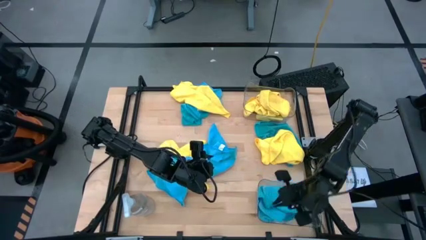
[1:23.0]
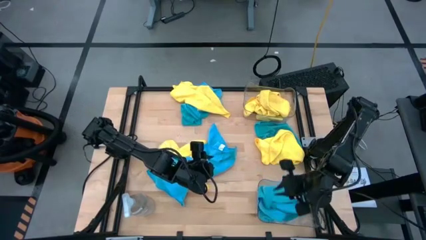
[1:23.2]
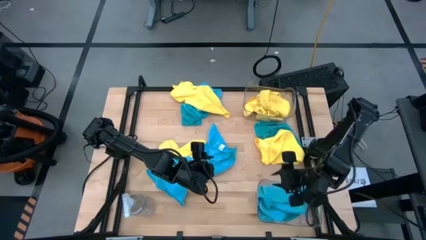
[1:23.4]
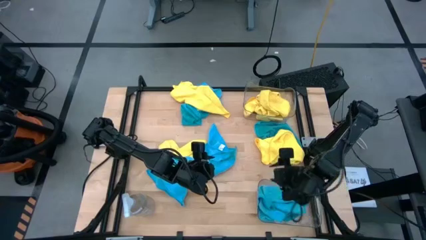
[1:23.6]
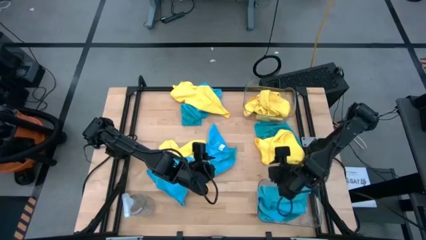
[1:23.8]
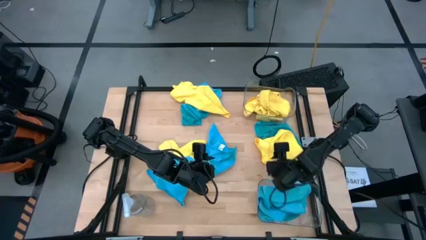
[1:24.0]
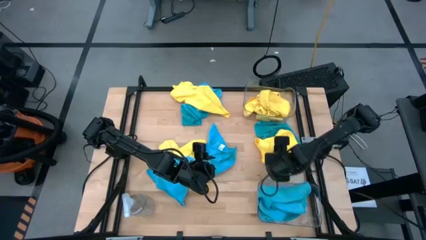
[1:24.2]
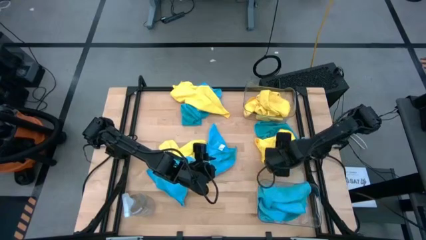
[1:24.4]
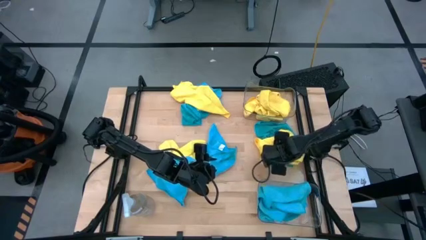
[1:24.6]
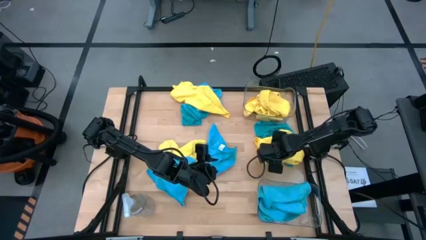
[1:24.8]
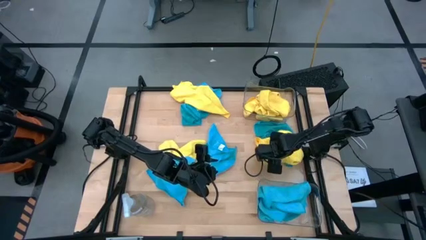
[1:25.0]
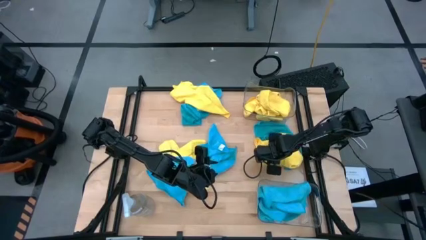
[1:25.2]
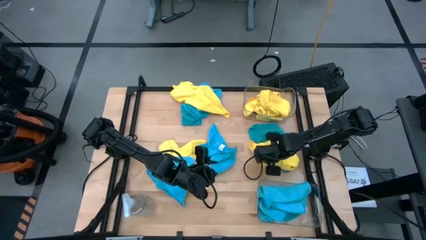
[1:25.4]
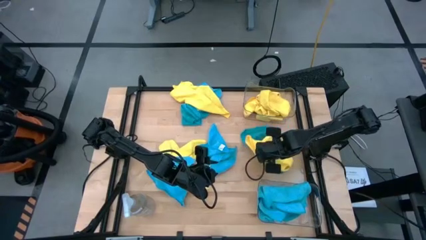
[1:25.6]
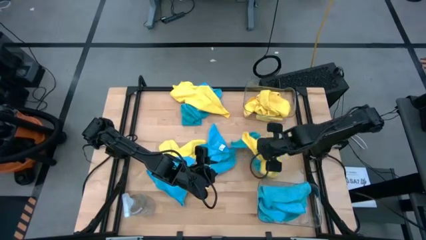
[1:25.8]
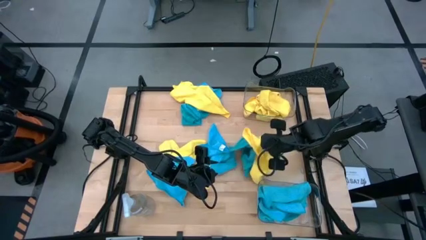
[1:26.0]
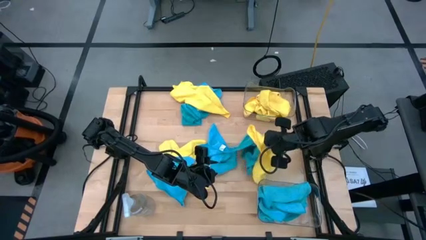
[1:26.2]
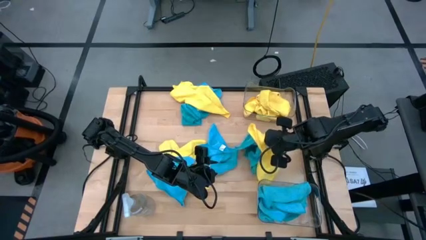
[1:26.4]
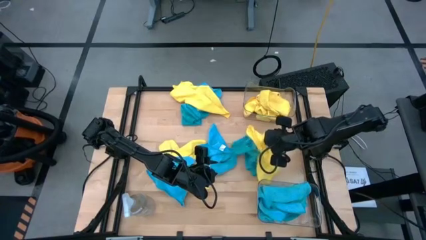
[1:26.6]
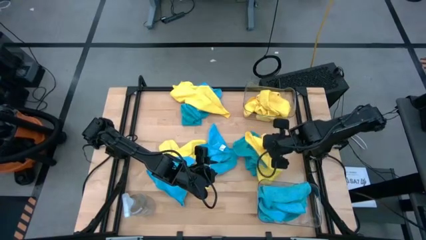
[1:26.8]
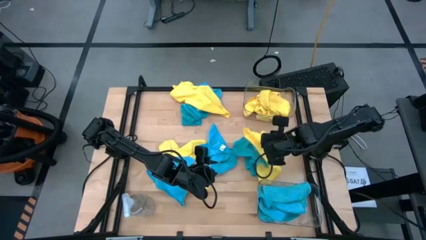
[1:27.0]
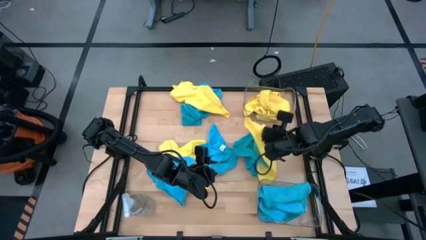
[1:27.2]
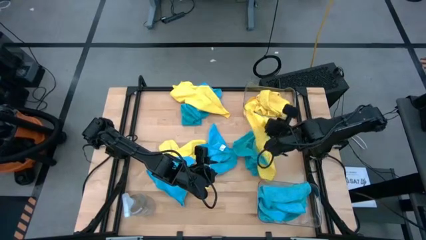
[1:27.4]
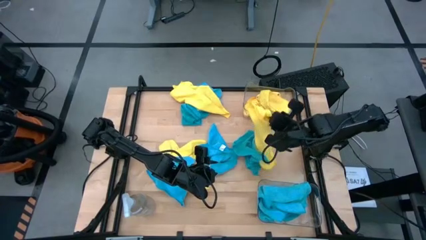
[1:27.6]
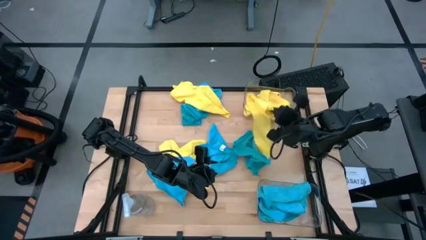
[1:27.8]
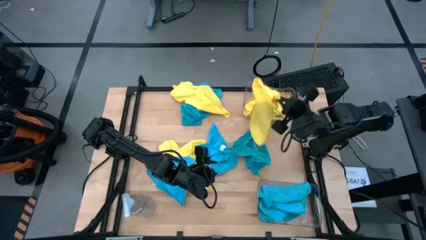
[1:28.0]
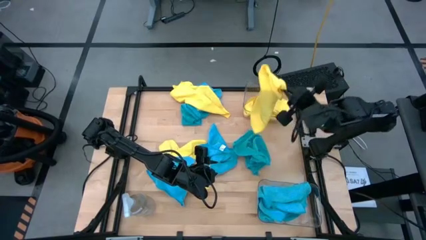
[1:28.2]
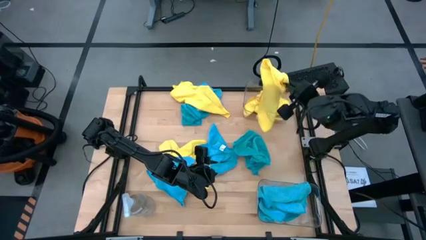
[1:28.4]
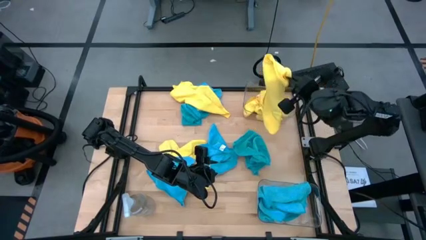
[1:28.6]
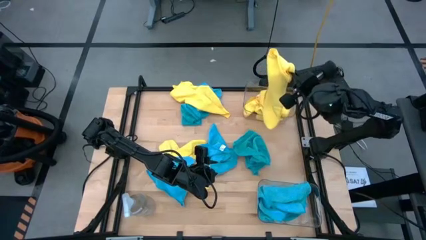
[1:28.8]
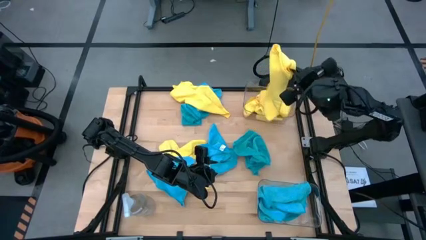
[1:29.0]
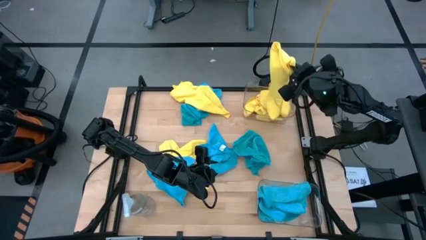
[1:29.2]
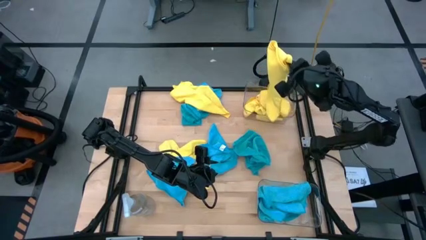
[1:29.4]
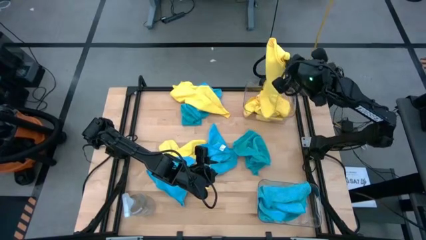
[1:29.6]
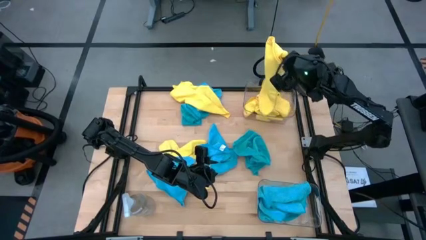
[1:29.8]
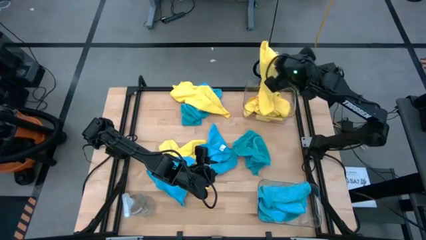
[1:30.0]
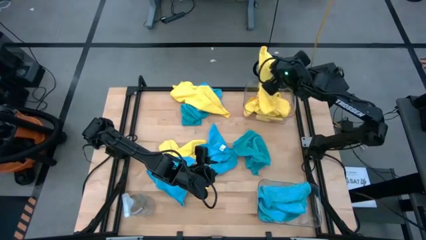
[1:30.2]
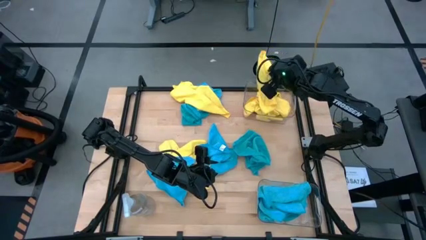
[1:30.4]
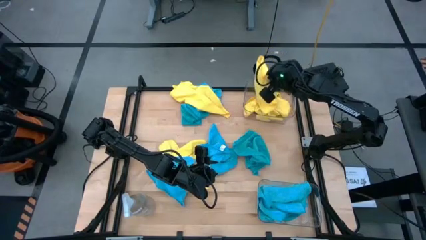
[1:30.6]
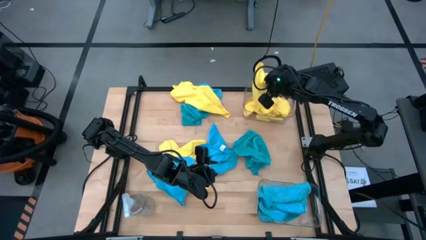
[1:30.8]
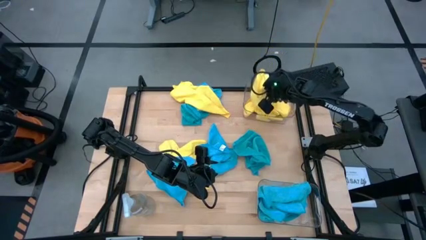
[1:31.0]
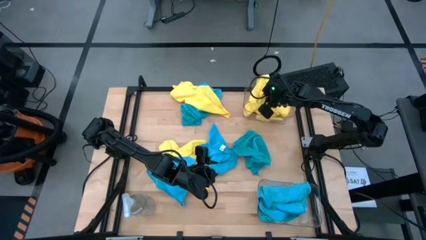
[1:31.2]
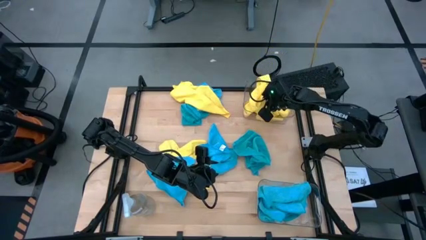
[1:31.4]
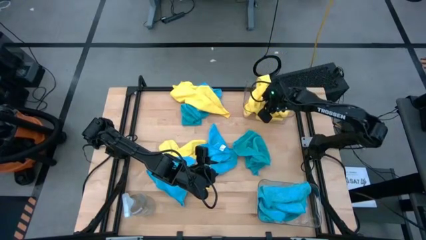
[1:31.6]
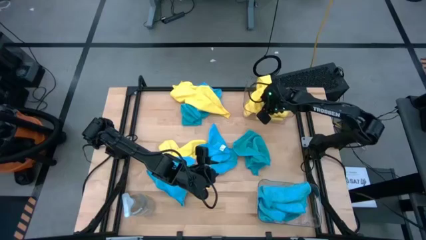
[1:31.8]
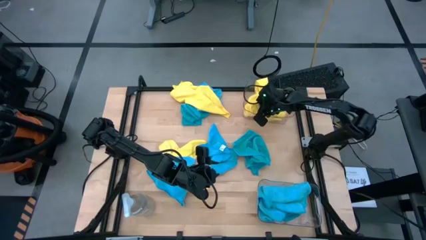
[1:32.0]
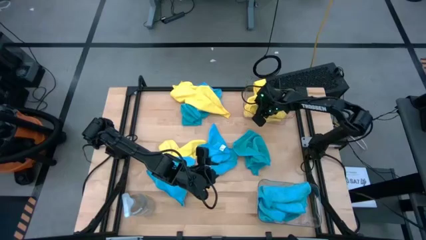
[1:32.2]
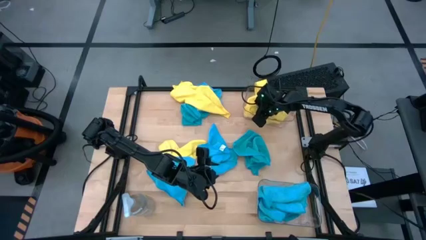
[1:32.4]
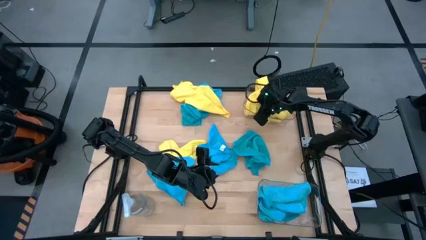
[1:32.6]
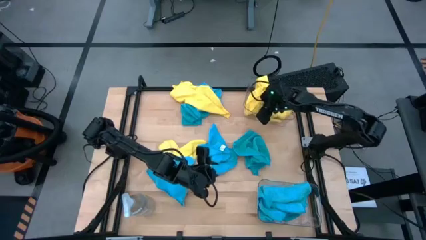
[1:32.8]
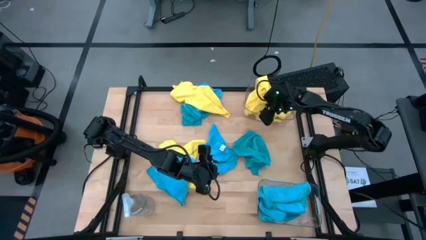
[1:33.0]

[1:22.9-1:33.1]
Task: Sort microfiber towel by color & place in baskets
Put the yellow microfiber cloth into the top transparent bin
